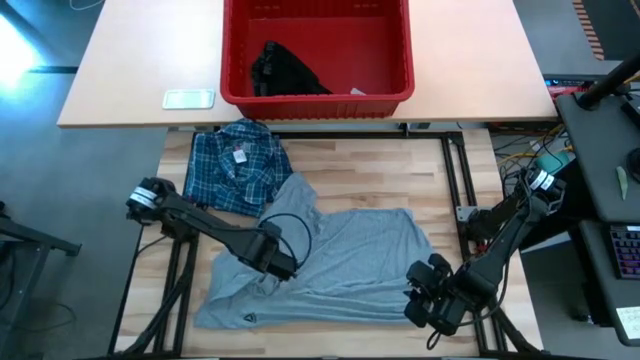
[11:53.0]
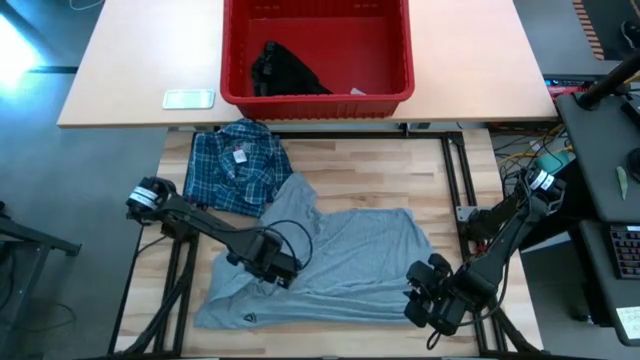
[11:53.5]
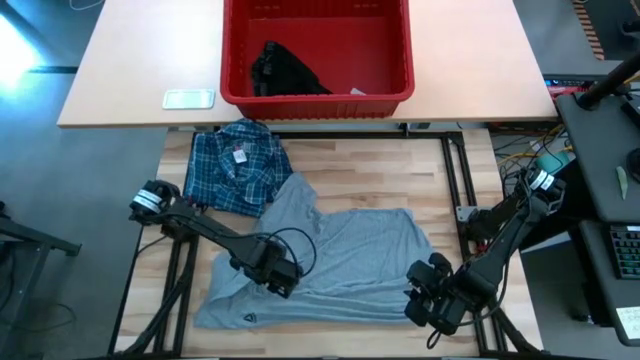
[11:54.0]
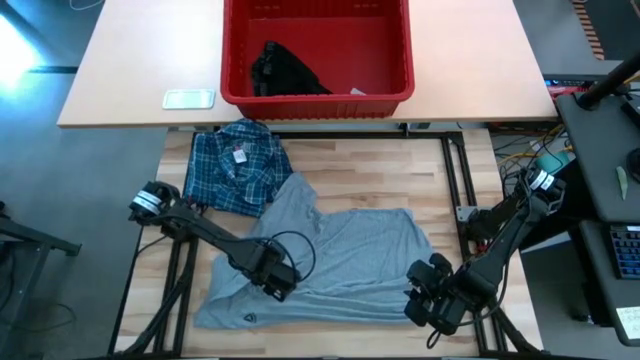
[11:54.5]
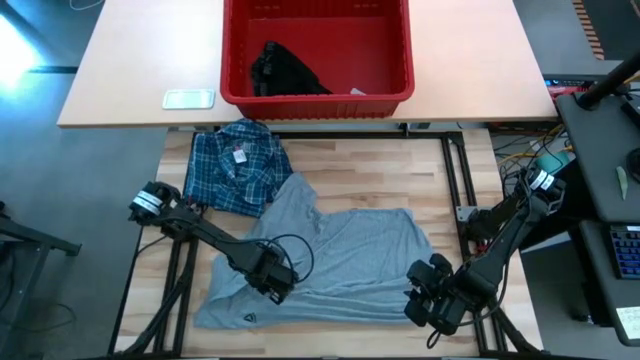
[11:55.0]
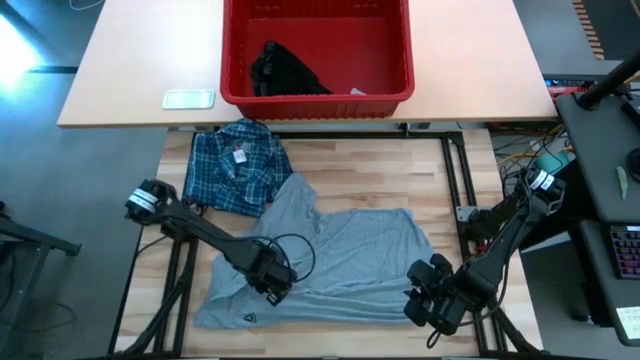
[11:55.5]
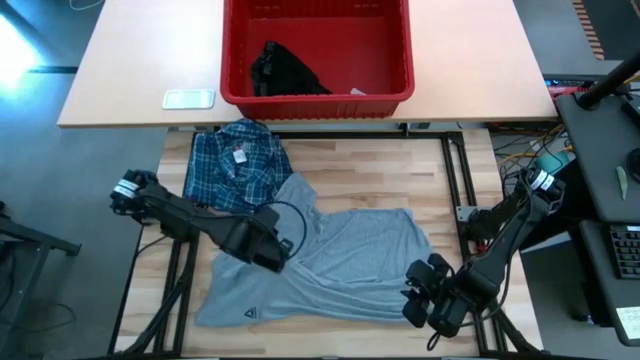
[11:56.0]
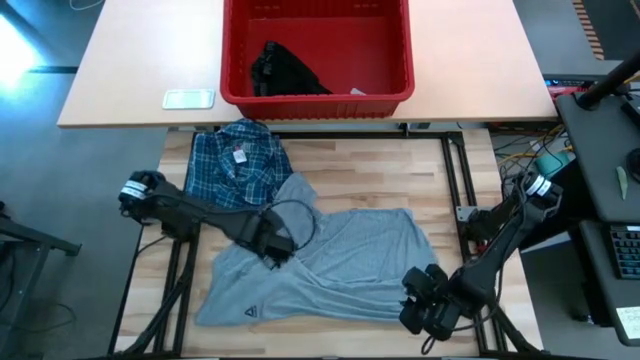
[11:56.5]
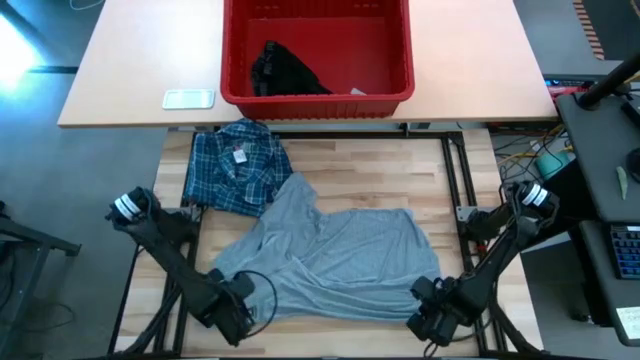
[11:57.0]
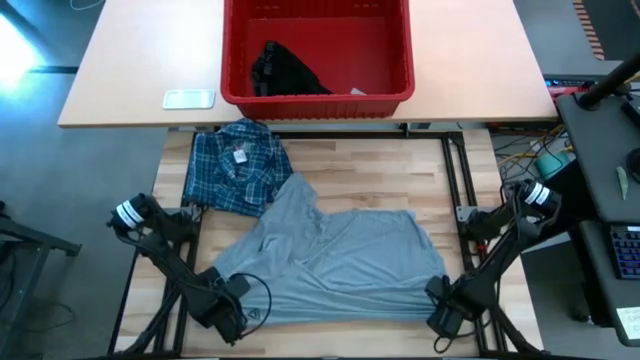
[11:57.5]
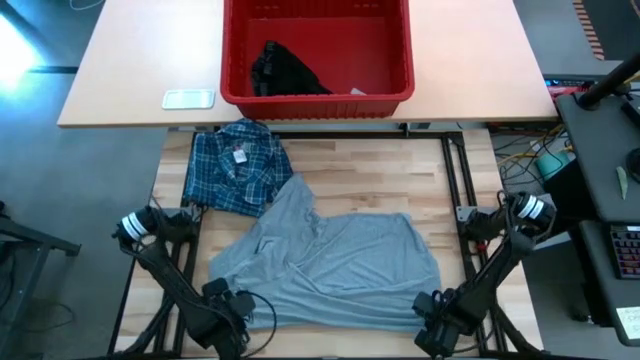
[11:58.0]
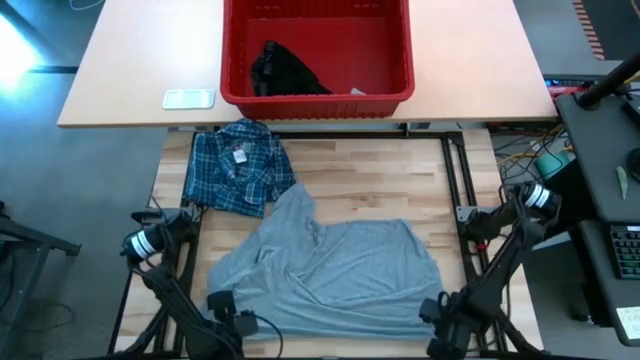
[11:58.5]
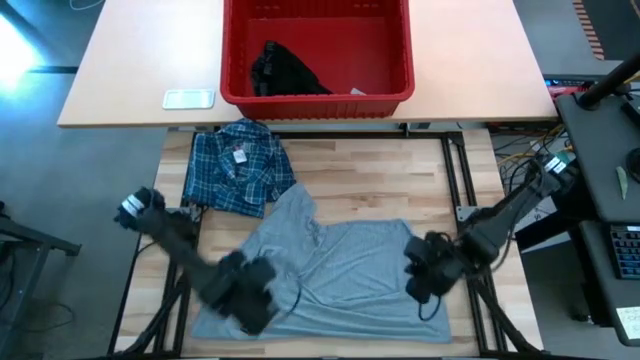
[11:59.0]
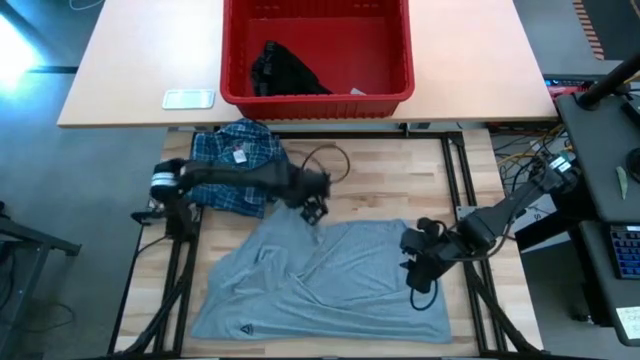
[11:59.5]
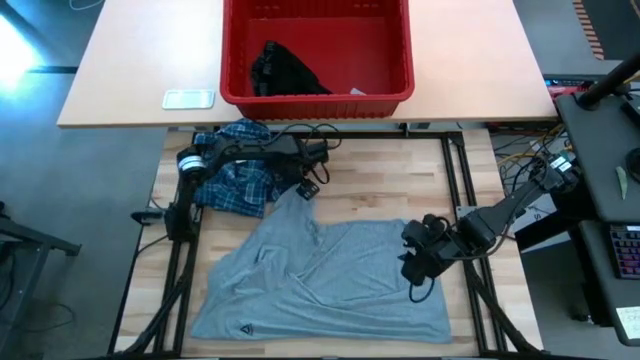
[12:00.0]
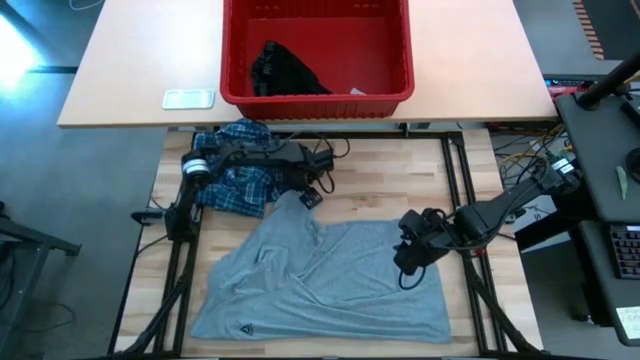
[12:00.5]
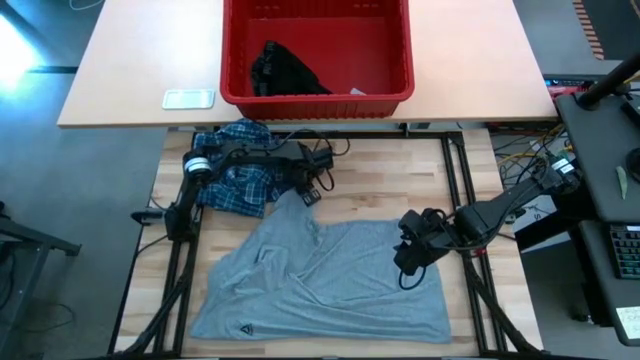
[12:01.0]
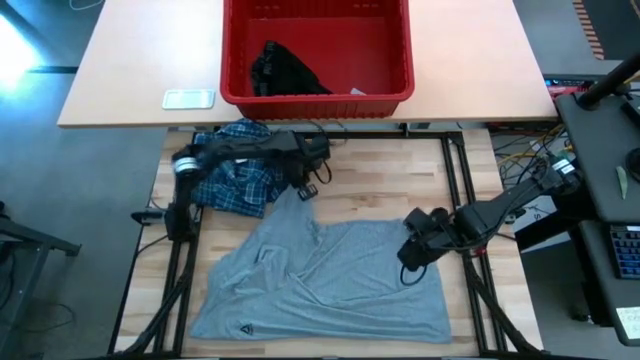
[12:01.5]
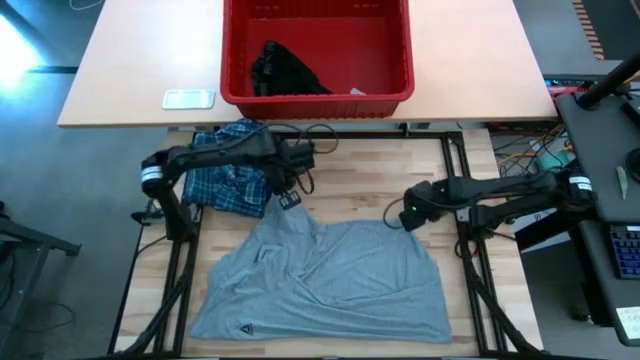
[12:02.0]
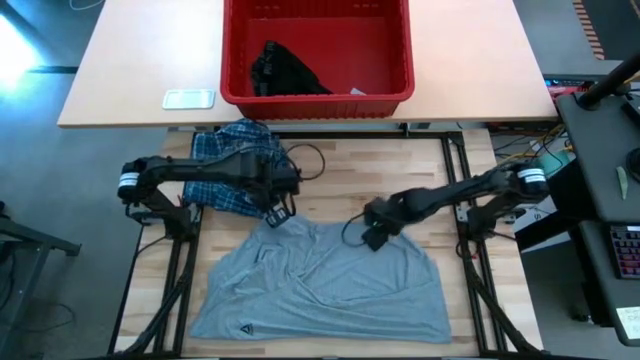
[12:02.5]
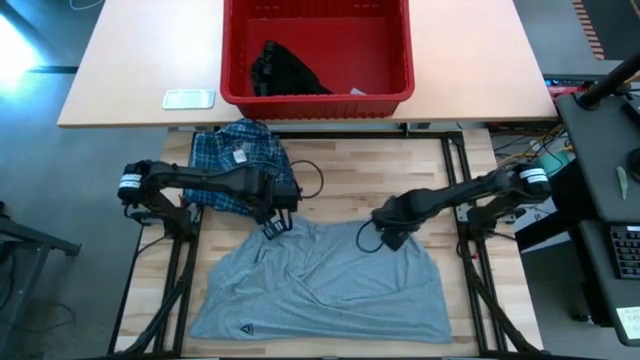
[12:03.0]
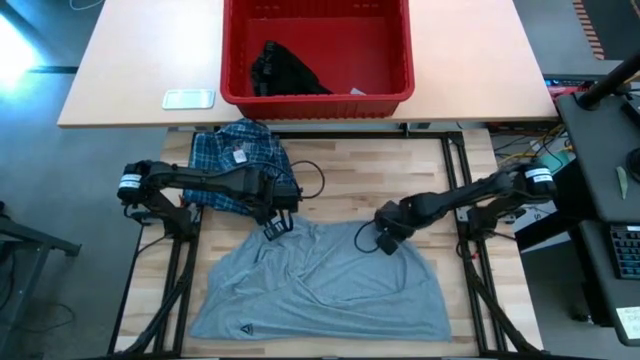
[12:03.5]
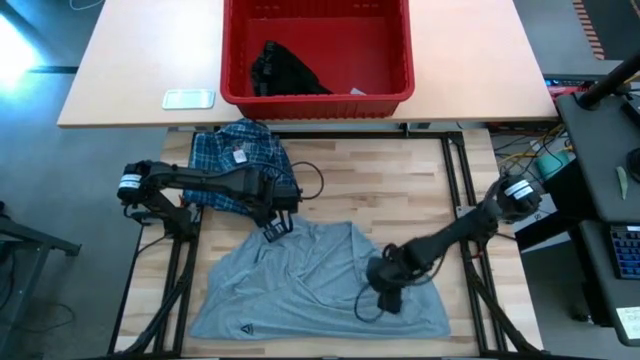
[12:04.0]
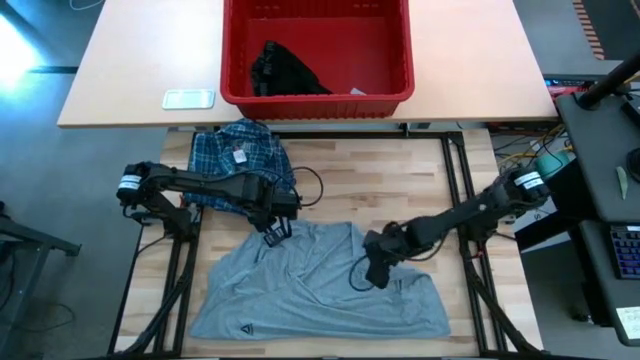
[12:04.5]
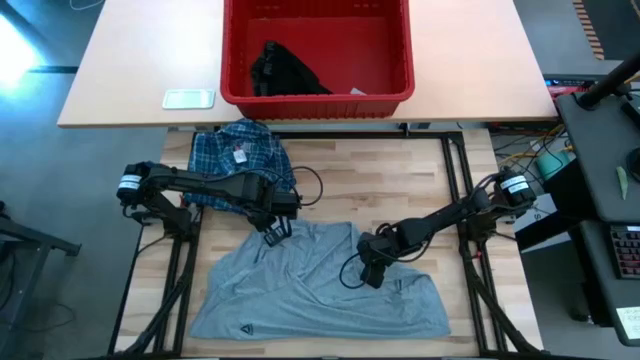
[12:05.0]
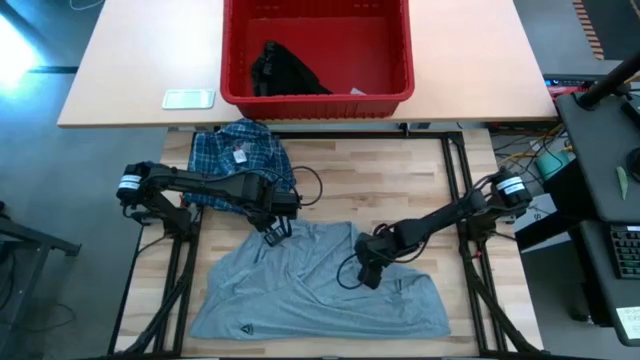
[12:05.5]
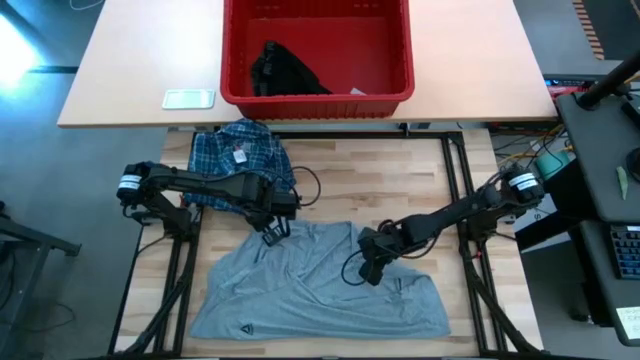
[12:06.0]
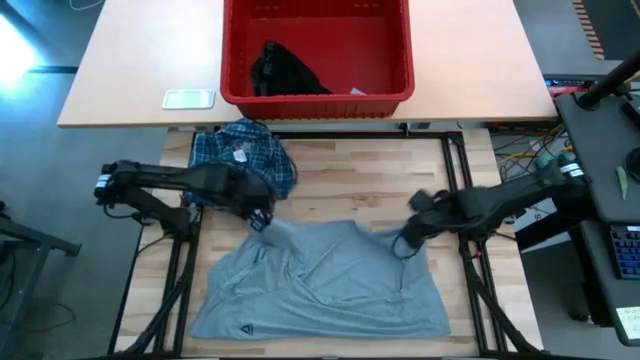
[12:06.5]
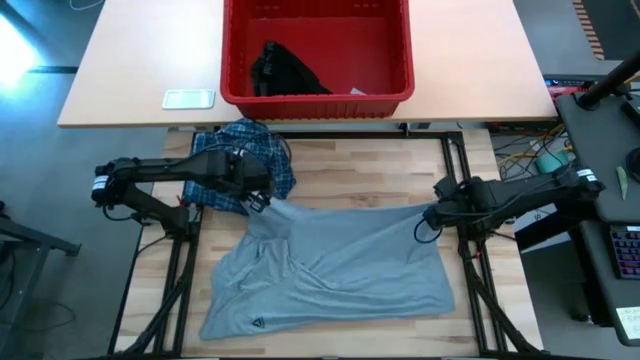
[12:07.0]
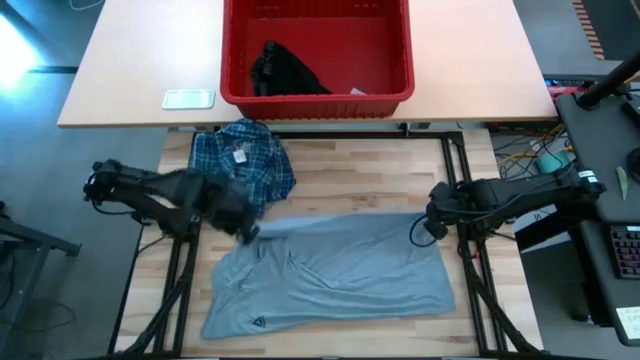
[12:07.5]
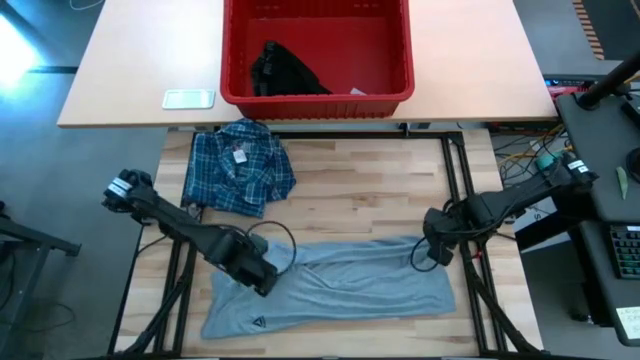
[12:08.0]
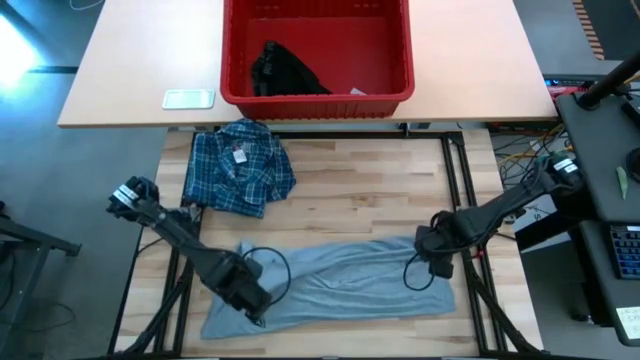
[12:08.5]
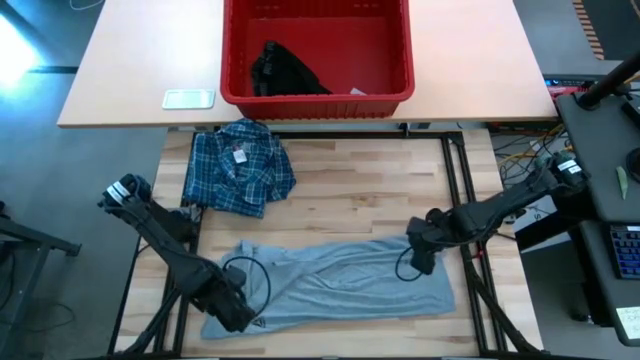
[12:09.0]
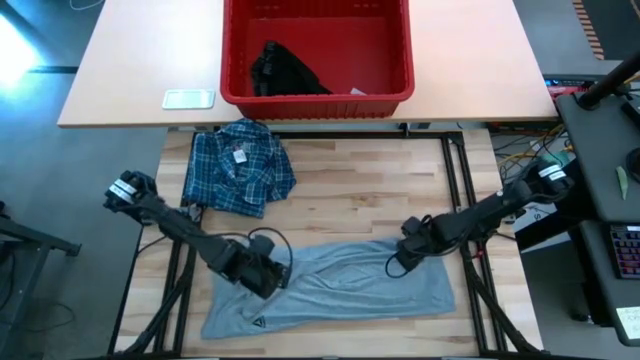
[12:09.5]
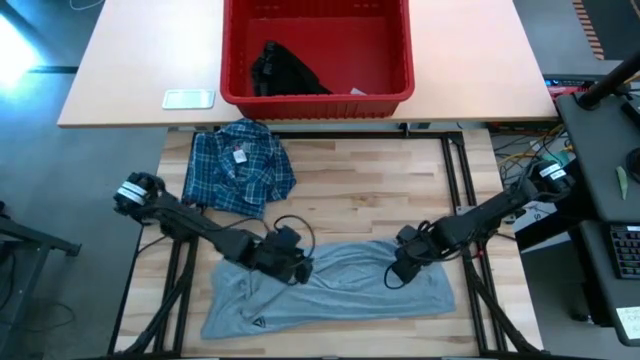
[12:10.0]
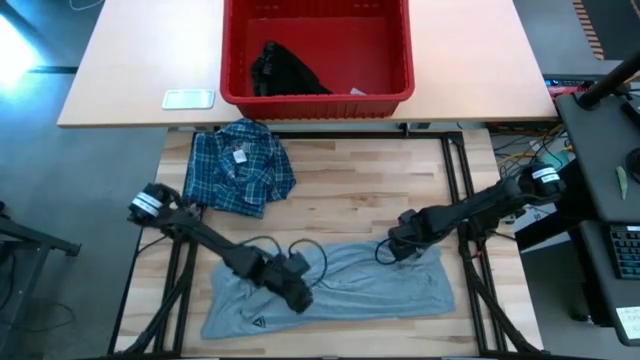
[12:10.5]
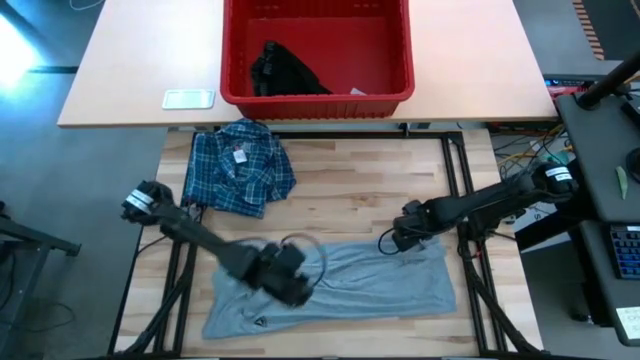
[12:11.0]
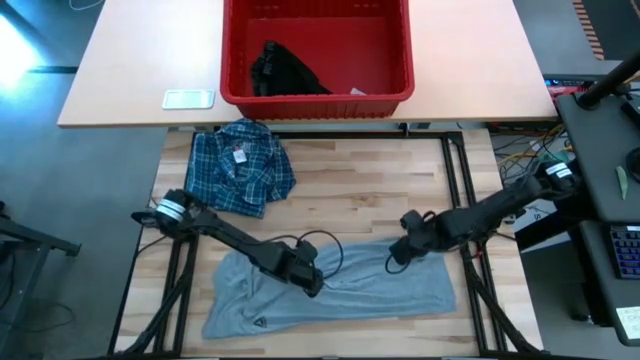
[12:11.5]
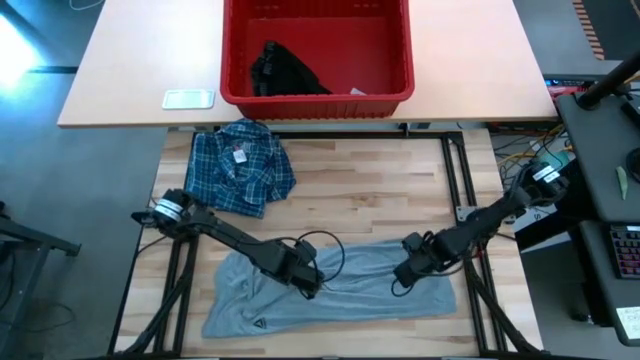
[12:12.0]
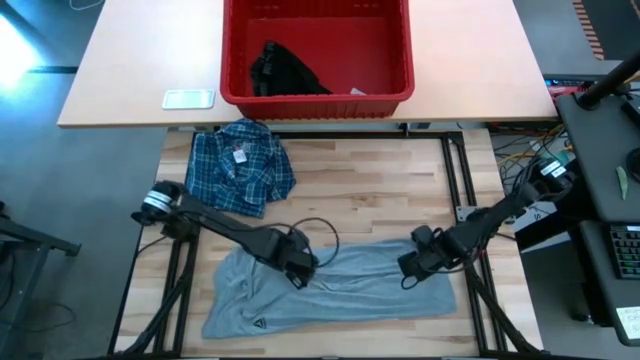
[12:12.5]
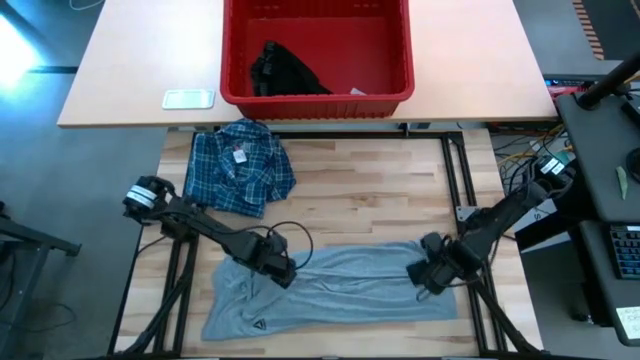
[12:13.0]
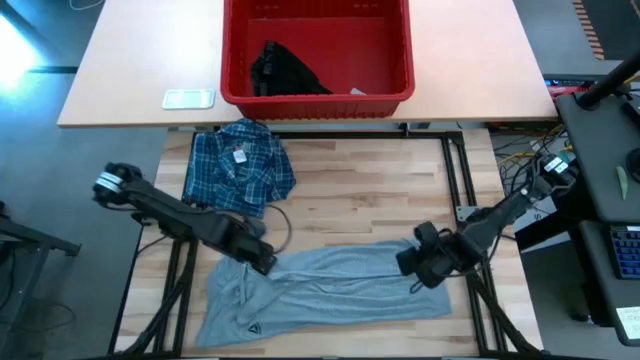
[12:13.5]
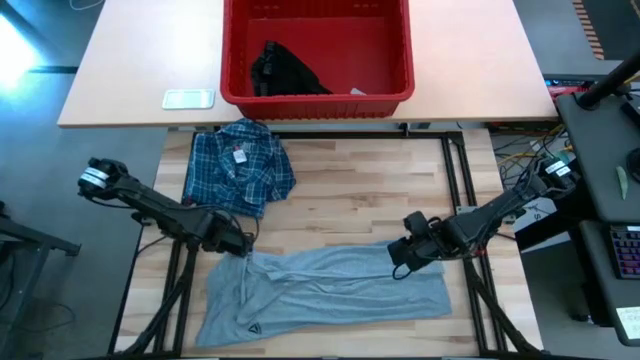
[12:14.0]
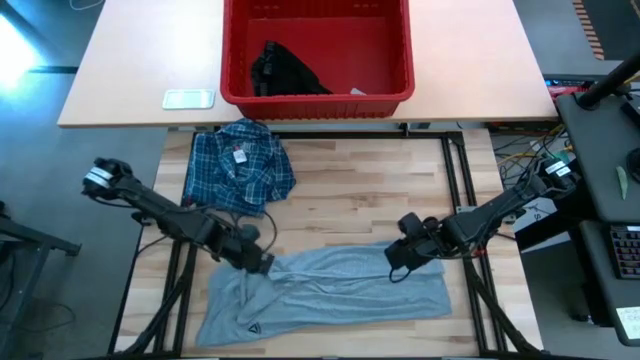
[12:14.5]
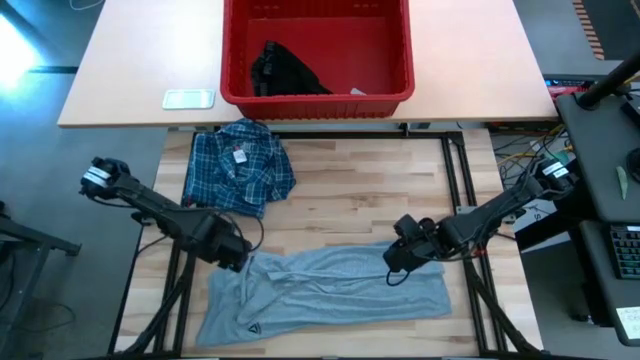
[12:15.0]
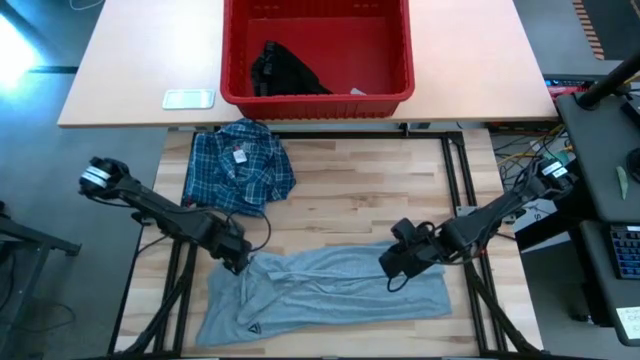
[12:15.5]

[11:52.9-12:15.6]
Task: Fold Laundry from Bin
Fold the gray shirt
